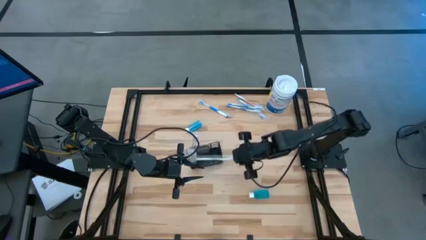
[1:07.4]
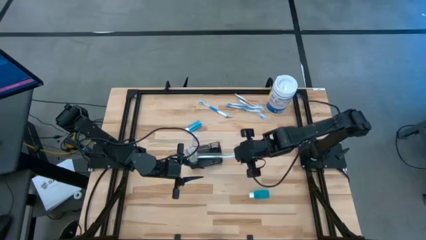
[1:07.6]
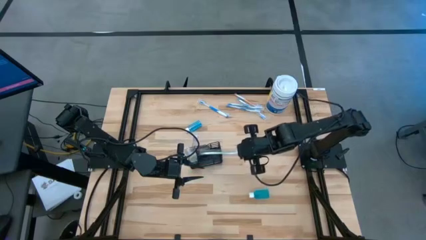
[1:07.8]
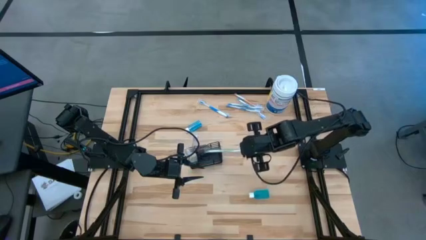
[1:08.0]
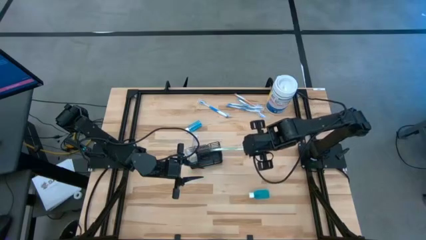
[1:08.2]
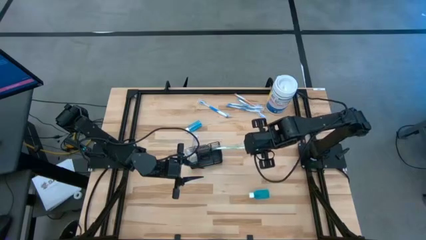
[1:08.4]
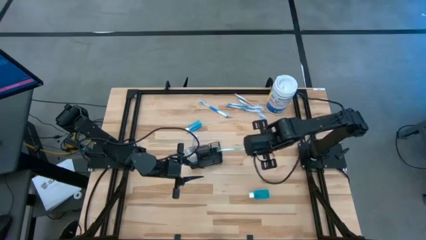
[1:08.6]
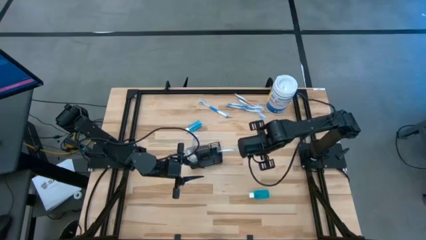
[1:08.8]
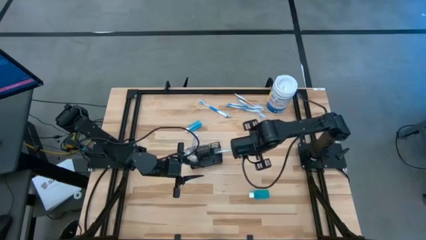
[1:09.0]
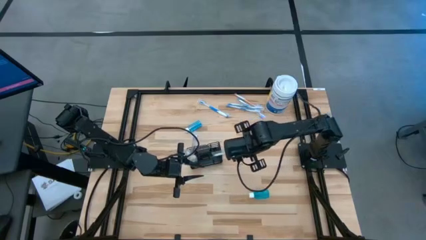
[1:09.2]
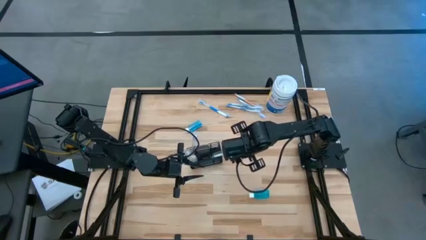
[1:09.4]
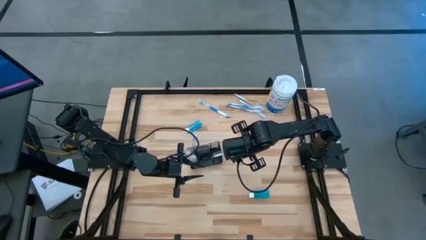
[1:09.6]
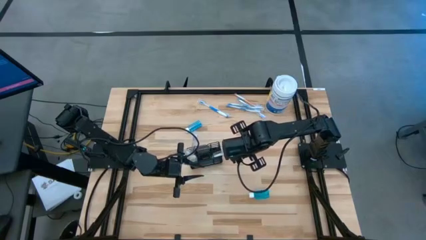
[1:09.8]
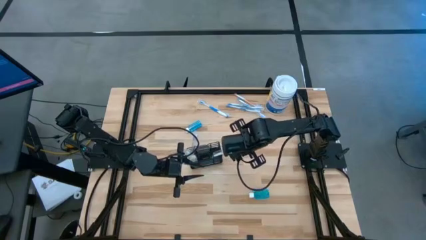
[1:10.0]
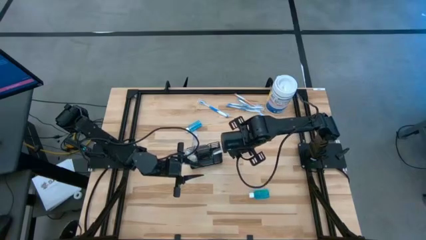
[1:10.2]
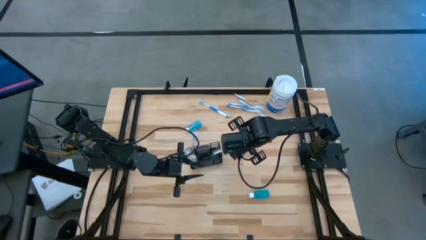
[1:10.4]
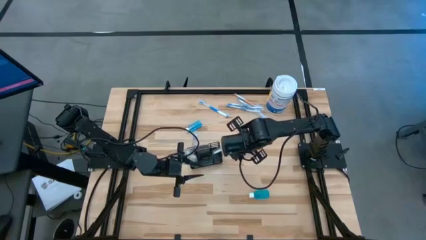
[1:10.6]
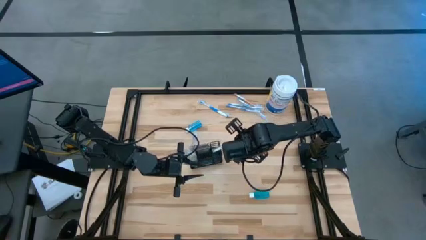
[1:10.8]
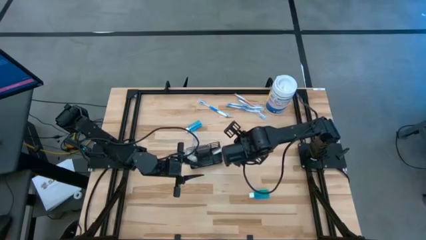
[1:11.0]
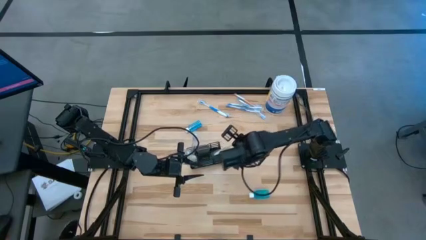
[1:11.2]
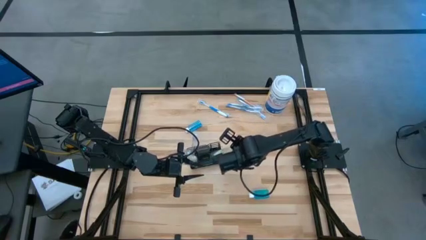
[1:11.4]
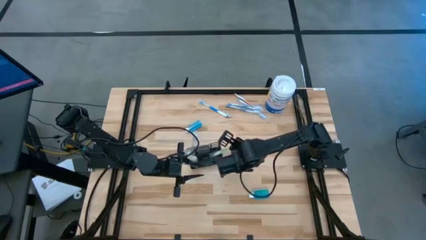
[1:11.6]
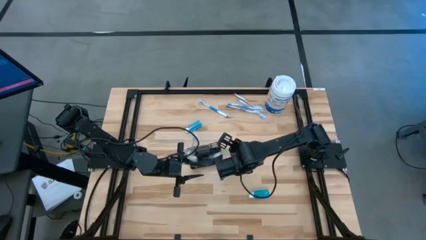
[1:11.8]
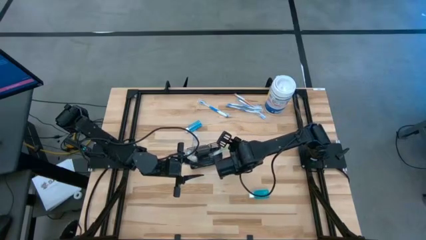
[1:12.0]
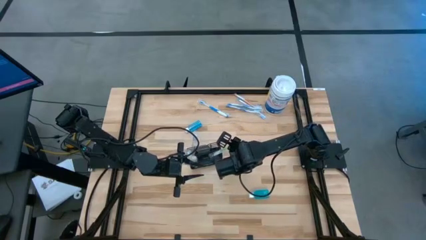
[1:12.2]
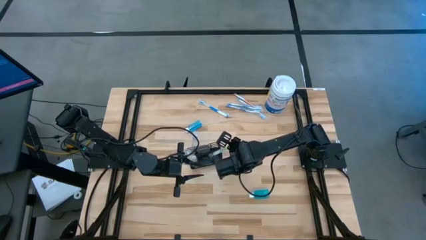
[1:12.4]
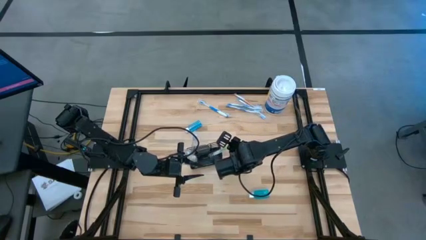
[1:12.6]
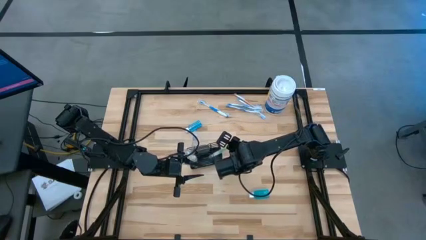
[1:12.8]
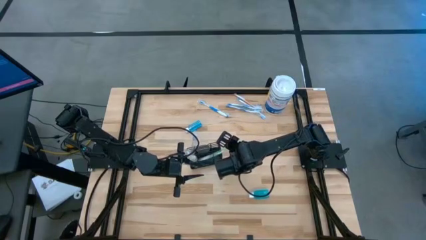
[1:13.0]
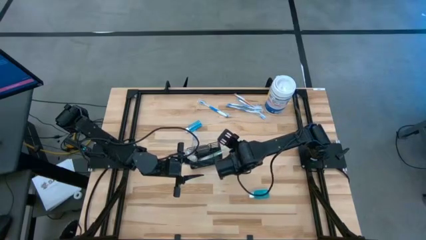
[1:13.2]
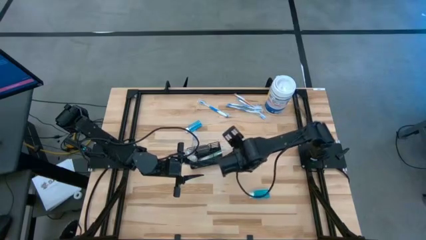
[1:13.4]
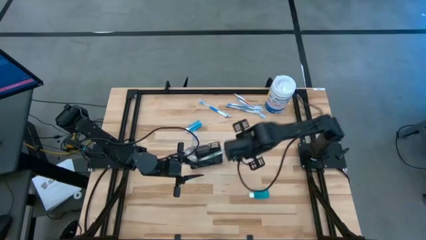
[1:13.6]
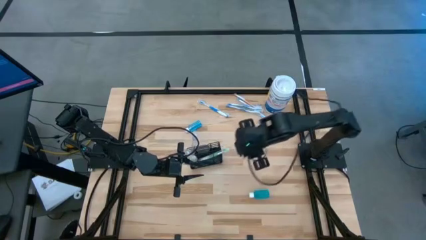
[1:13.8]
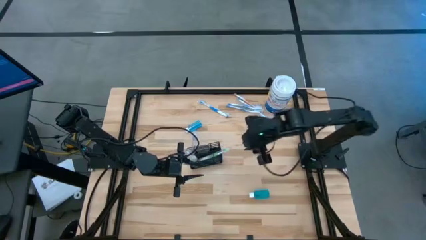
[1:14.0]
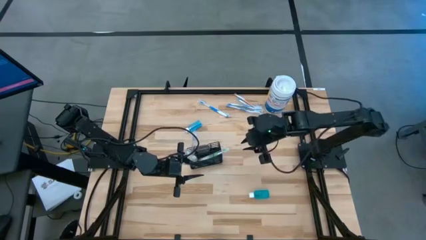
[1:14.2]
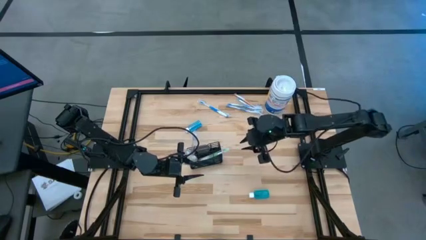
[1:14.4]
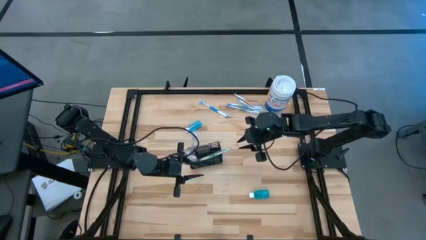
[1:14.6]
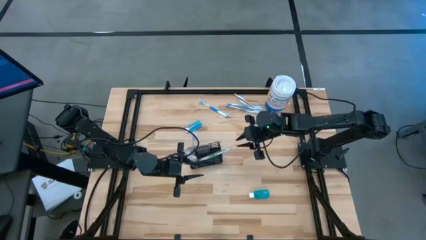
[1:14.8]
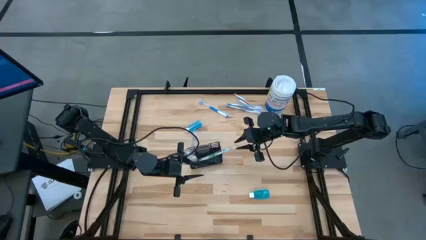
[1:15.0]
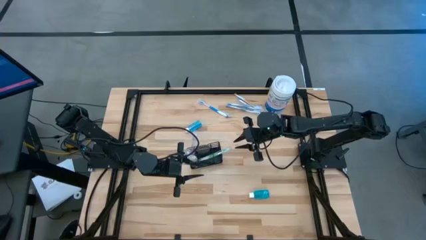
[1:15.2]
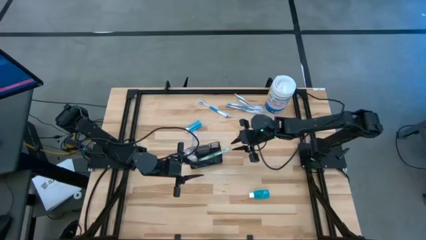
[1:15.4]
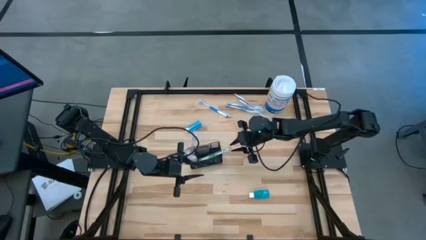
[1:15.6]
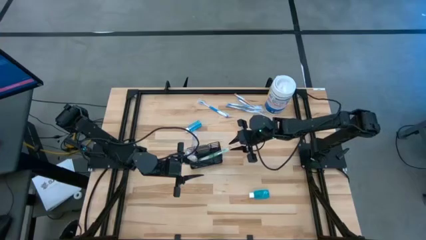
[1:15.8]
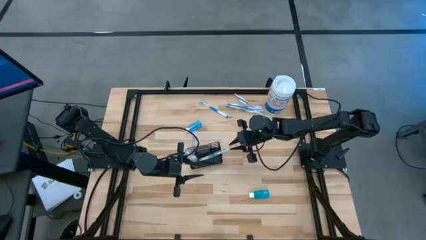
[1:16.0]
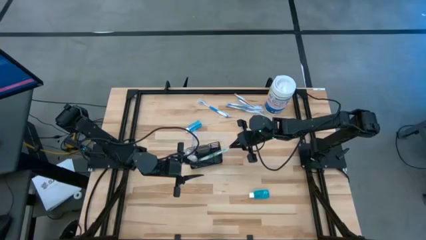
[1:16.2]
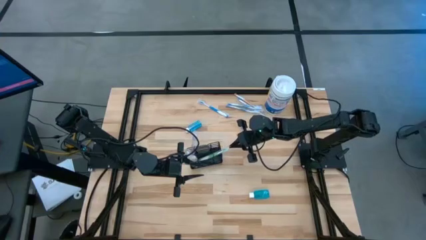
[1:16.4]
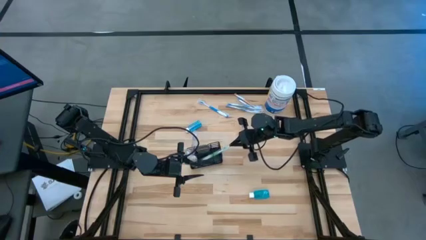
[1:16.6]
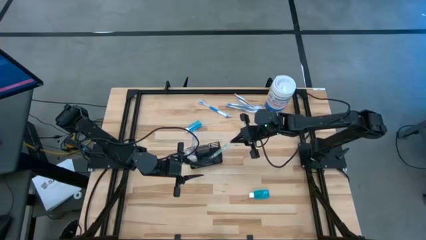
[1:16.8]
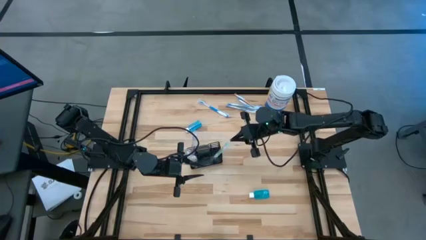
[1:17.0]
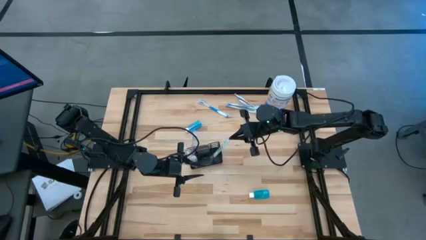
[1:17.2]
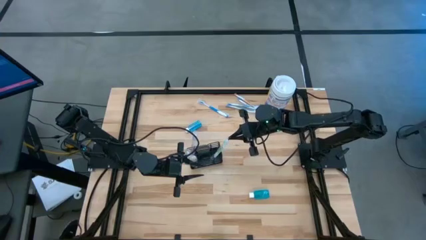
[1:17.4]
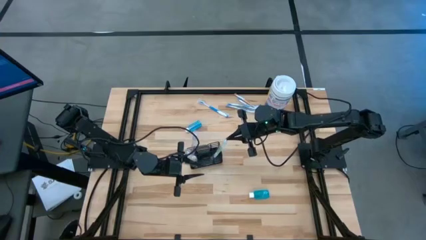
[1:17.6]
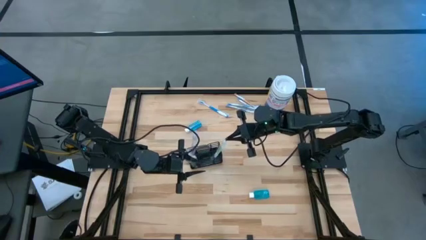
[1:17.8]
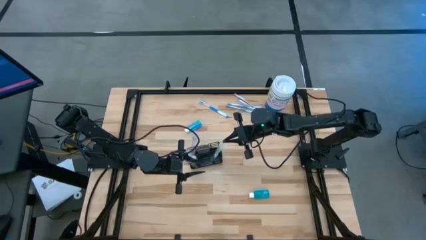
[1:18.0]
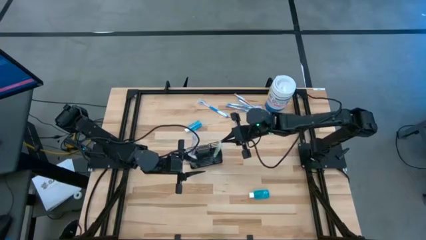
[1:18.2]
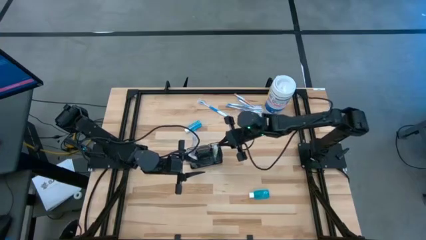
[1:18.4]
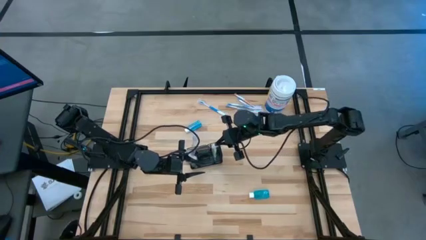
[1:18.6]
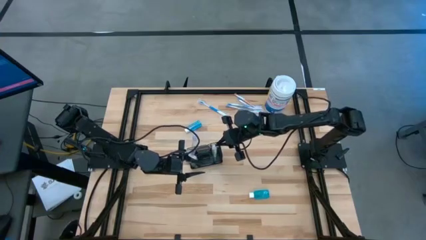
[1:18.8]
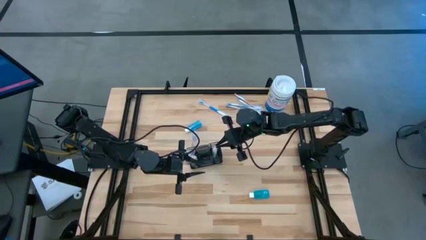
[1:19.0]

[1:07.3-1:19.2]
Task: Pick & Place toothbrushing station
Put the green toothbrush into the wire organizer
